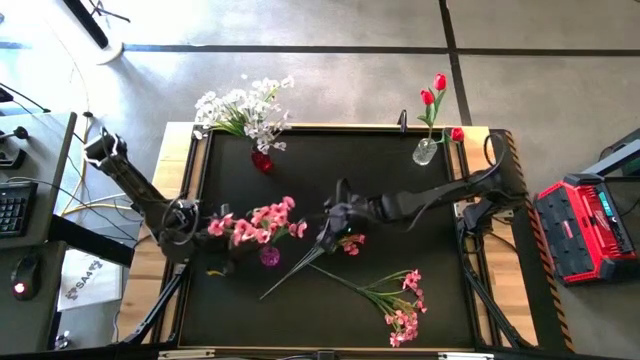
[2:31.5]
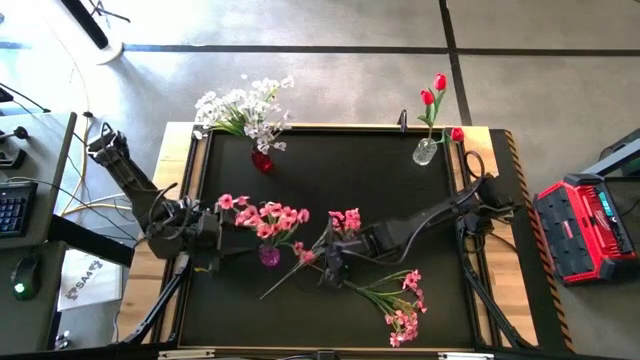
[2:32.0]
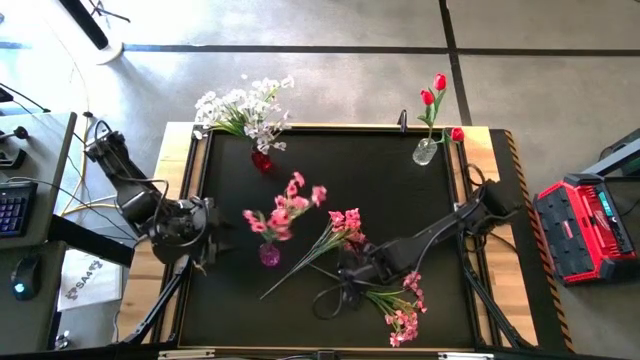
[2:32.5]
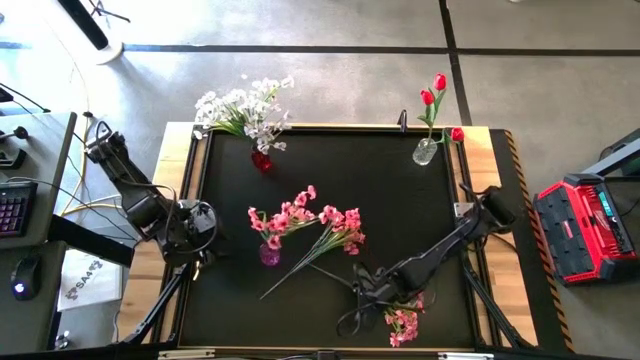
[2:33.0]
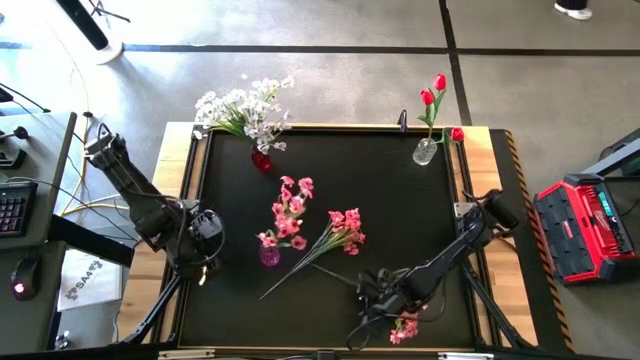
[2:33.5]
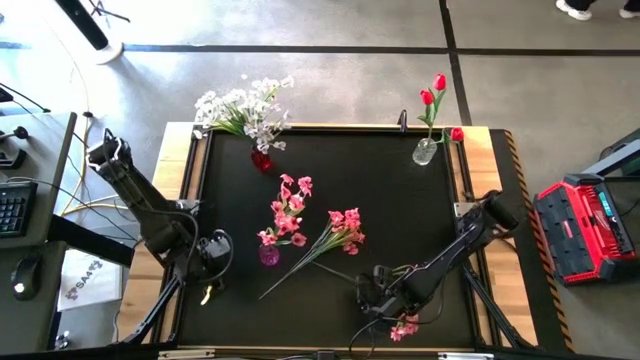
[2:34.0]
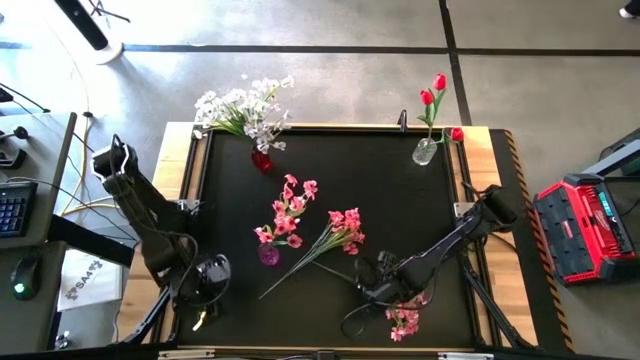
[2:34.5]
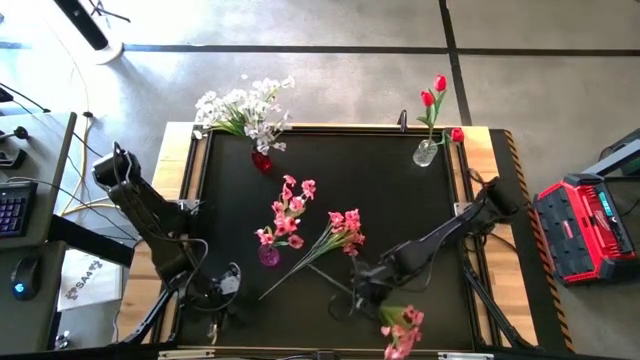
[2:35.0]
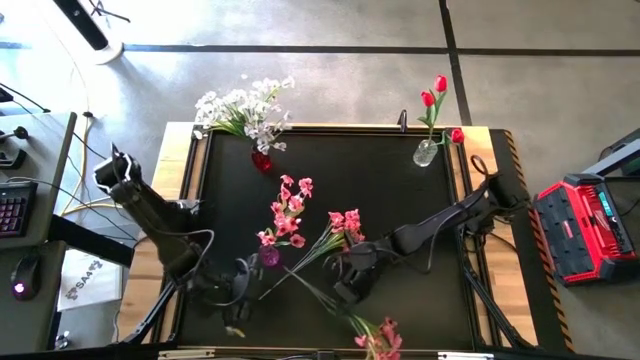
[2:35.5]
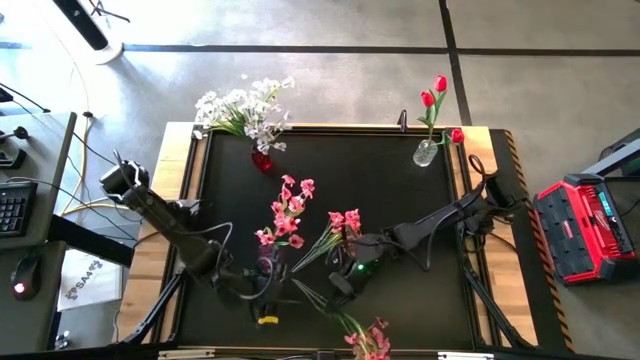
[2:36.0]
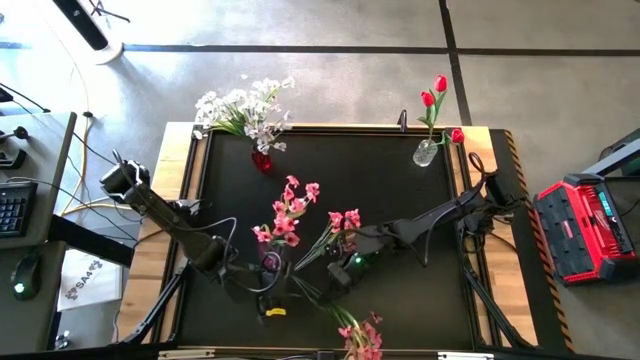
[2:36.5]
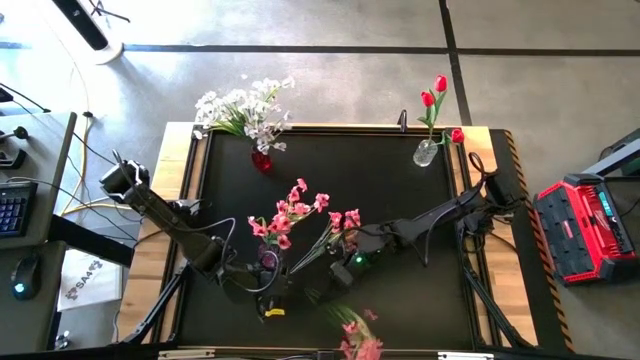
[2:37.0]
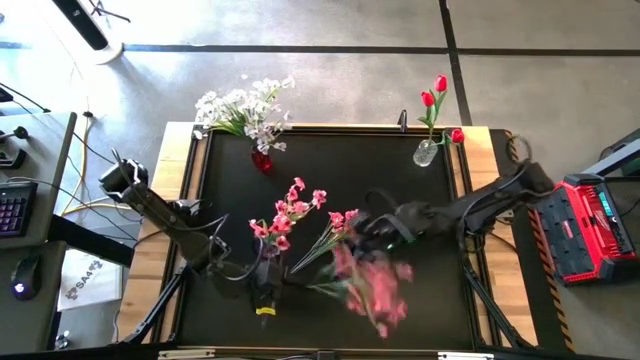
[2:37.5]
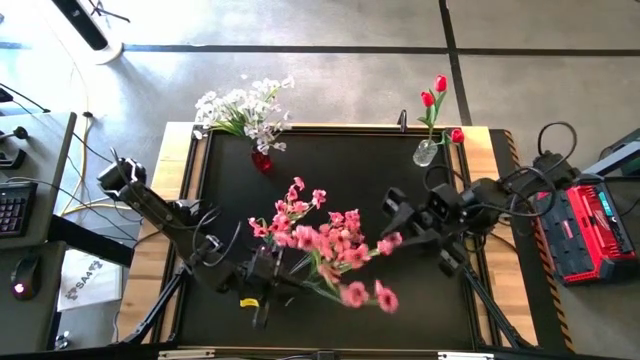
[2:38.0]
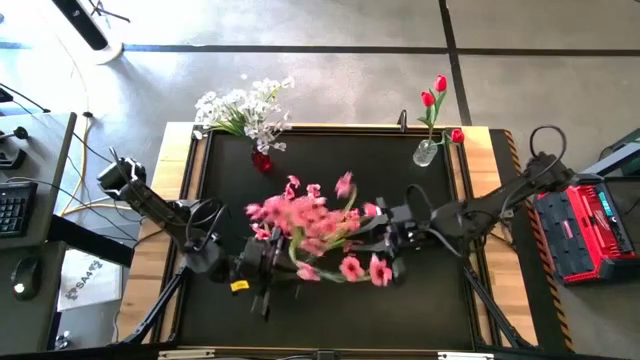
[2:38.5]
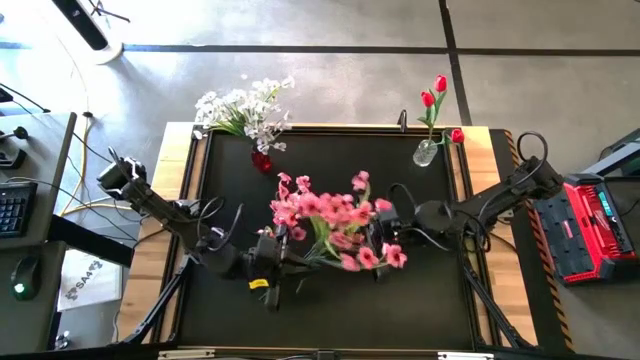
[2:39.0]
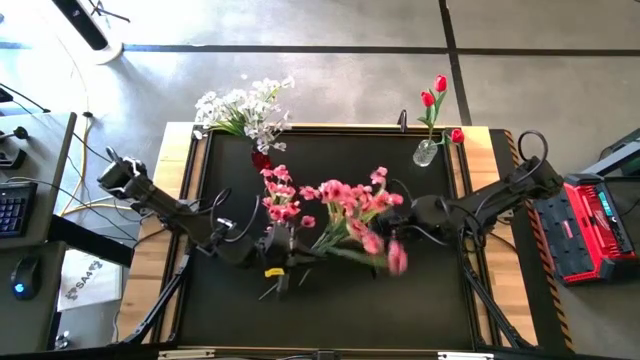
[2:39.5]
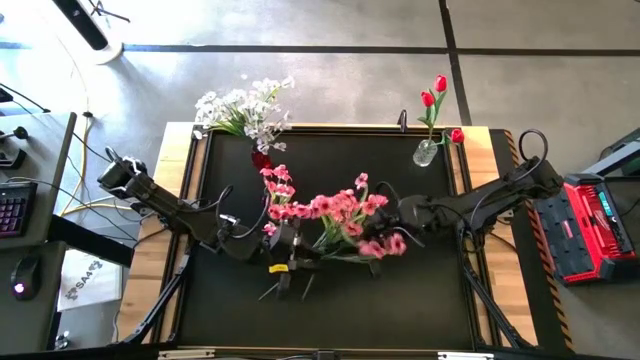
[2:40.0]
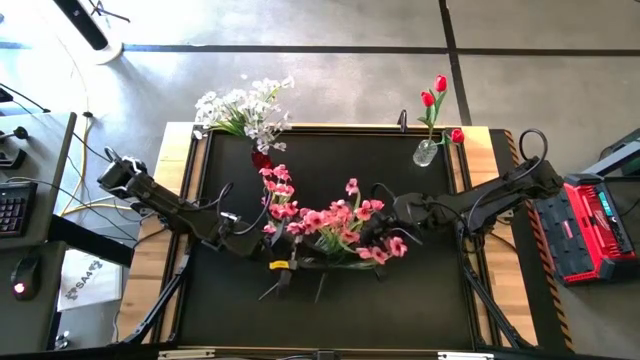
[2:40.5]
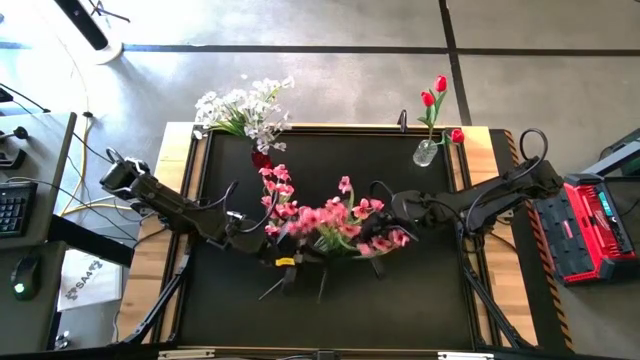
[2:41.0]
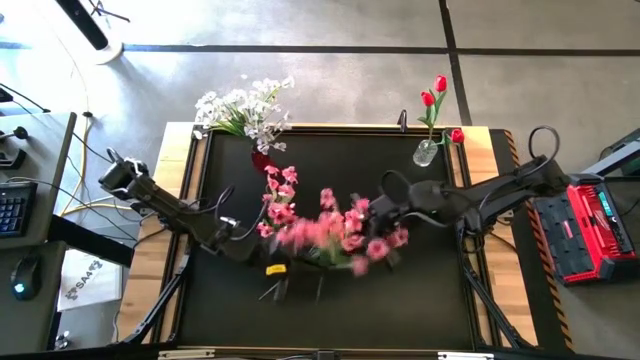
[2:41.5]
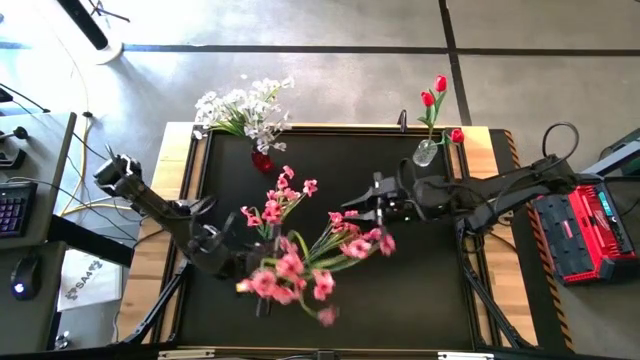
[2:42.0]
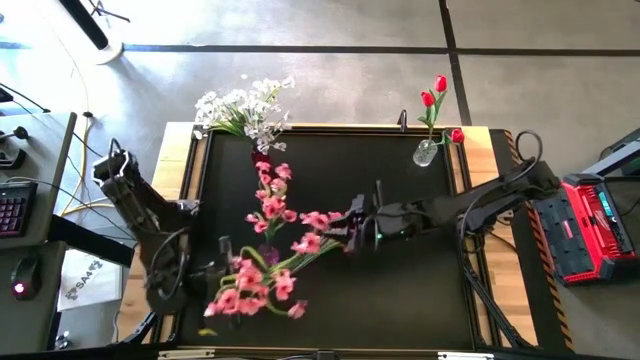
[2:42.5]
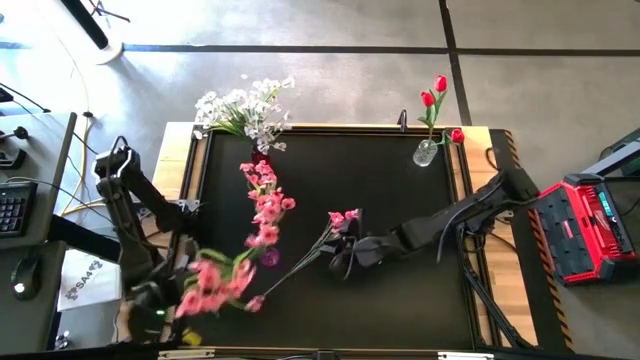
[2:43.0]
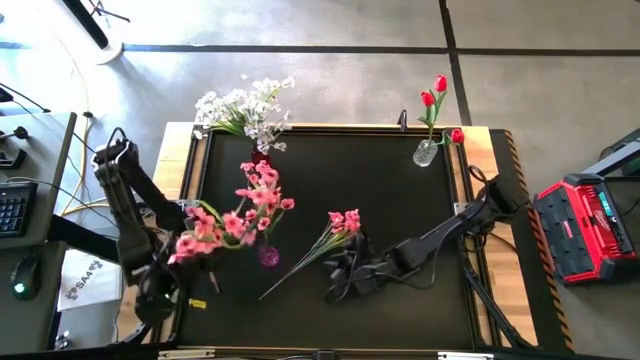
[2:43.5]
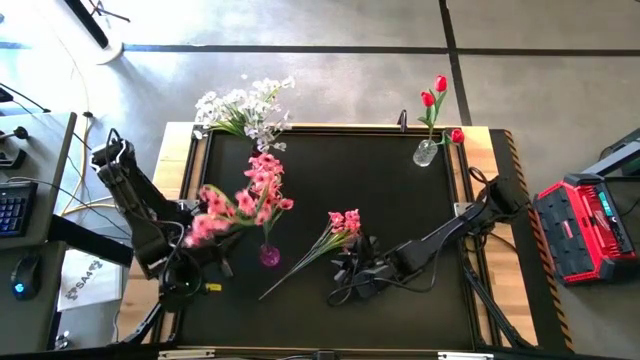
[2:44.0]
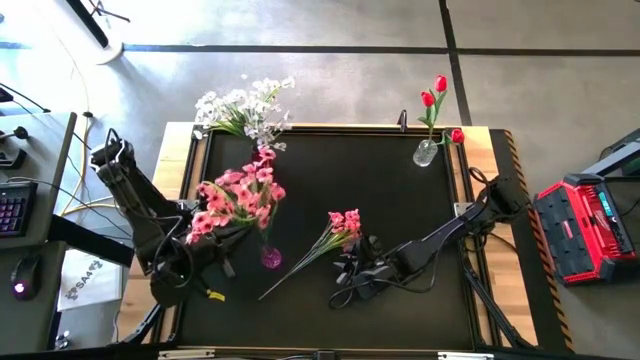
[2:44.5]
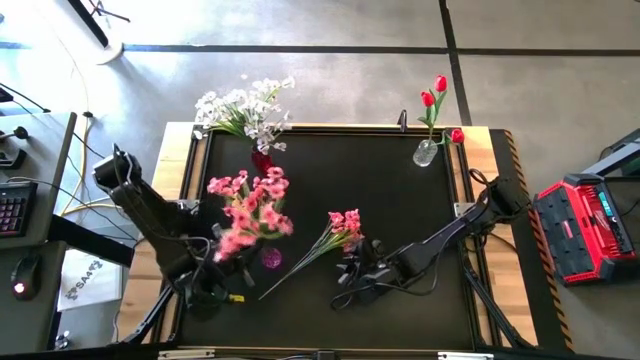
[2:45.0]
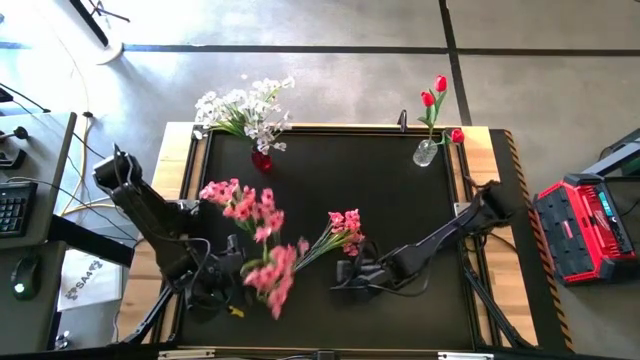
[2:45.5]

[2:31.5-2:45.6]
Task: Sort flowers into vase by color
Put the bottom pink flowers into the purple vase

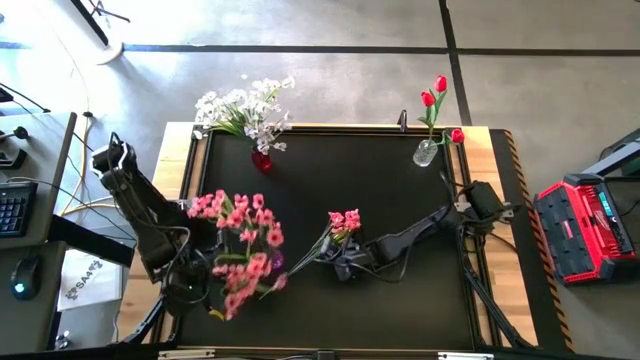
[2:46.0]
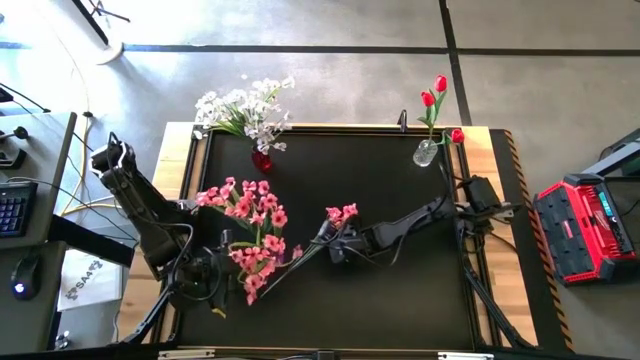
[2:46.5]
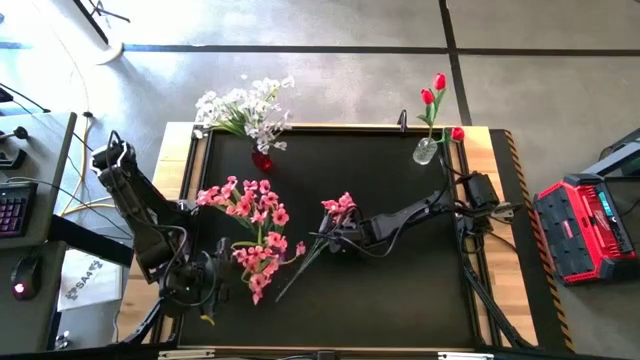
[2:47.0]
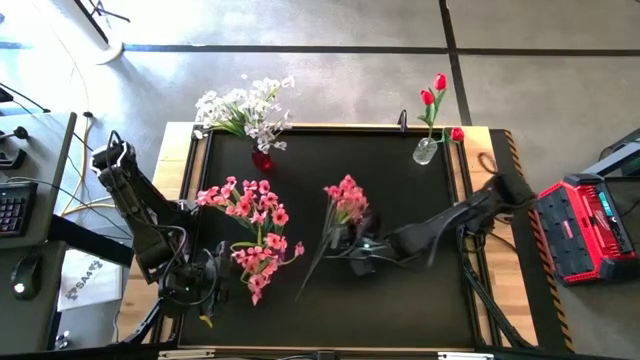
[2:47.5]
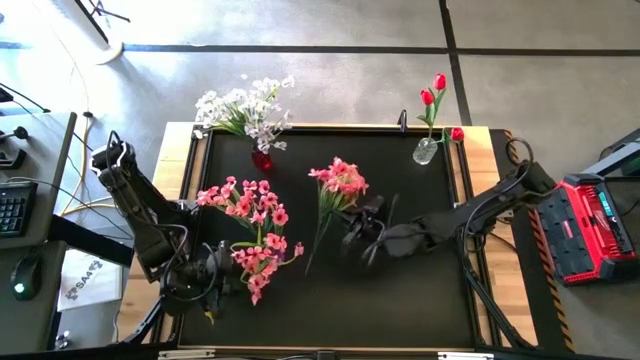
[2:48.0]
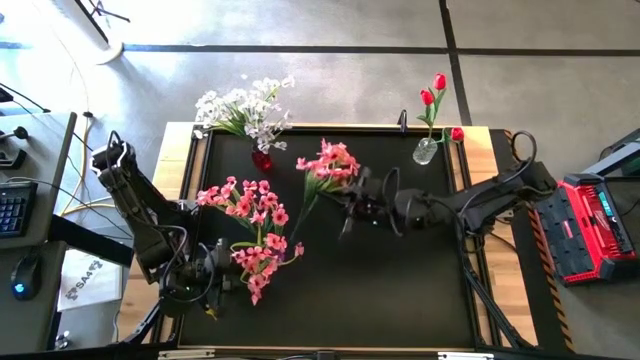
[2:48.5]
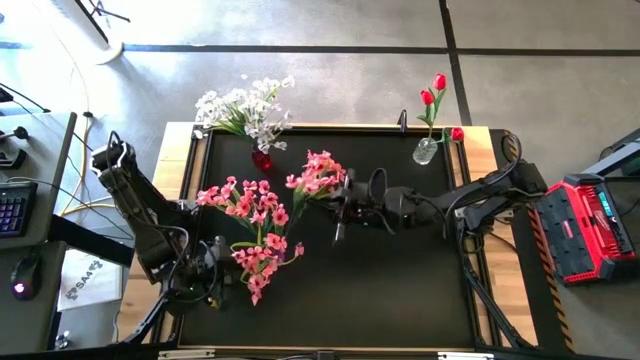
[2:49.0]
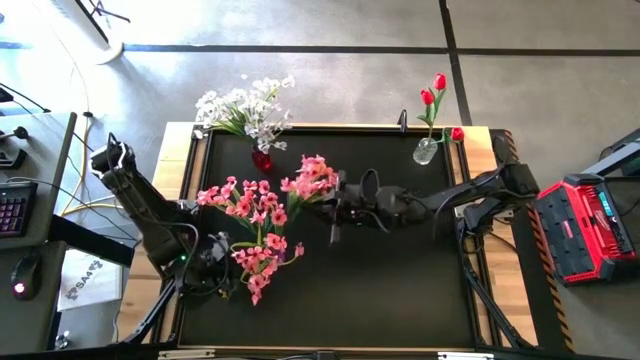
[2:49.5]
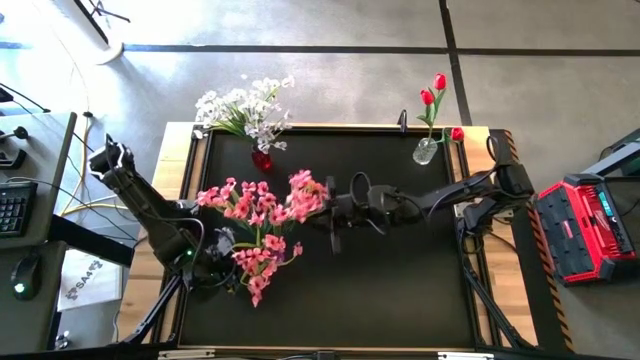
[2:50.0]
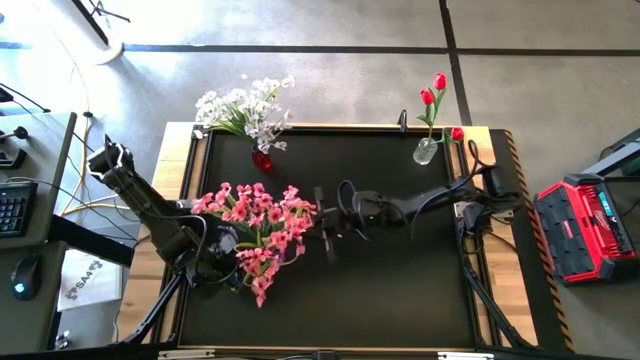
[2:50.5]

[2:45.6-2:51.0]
Put the pink flowers into the purple vase

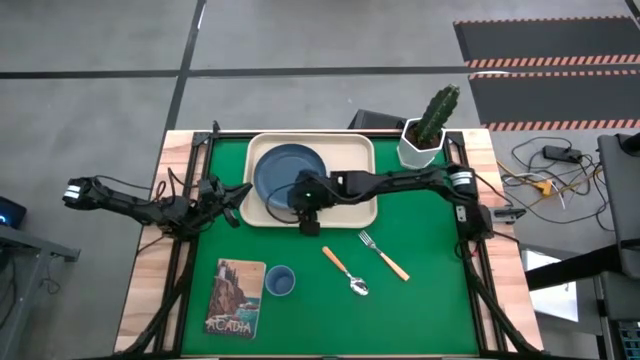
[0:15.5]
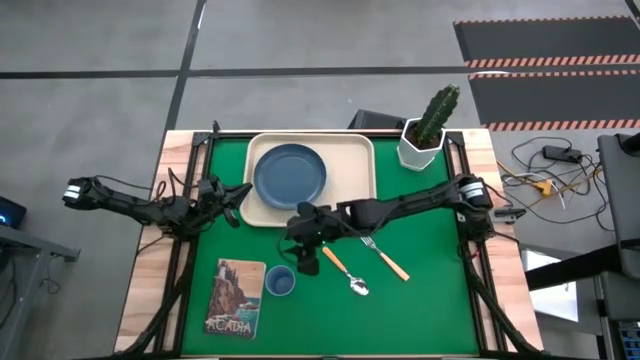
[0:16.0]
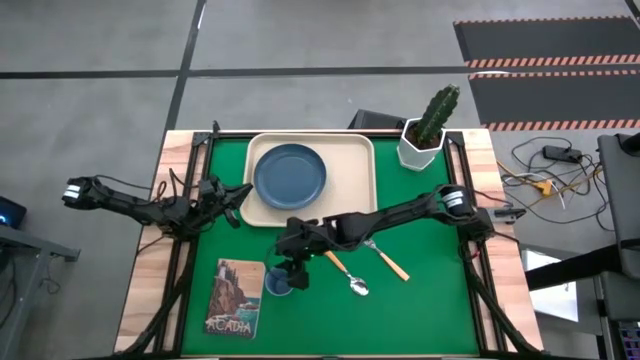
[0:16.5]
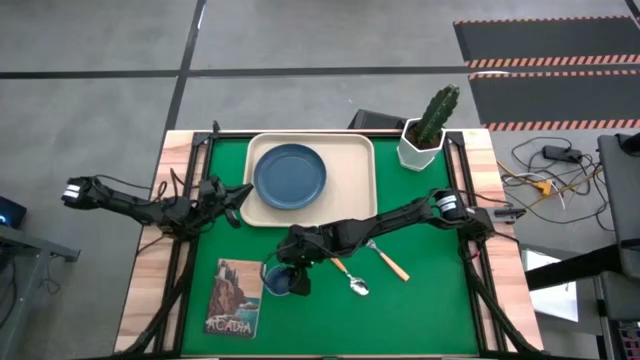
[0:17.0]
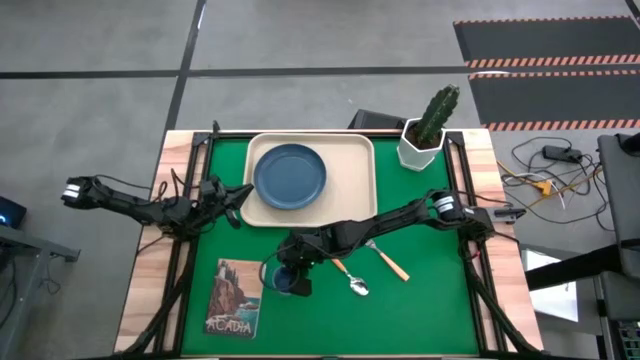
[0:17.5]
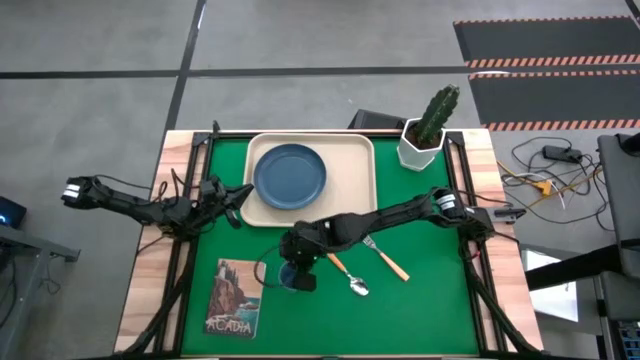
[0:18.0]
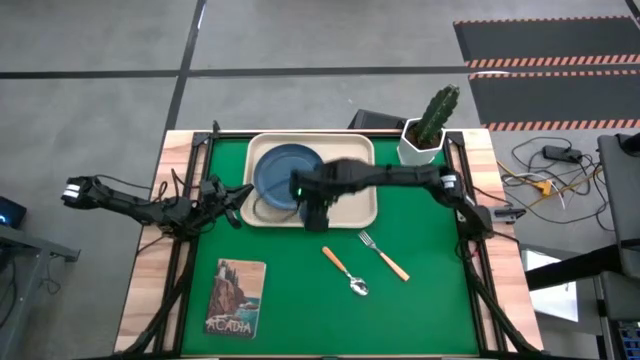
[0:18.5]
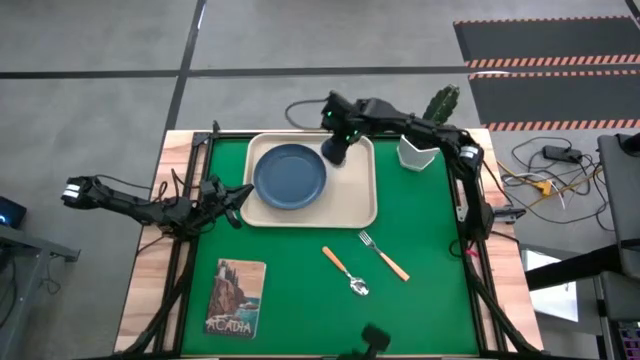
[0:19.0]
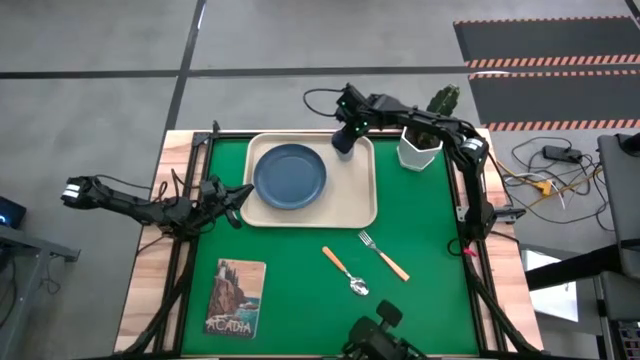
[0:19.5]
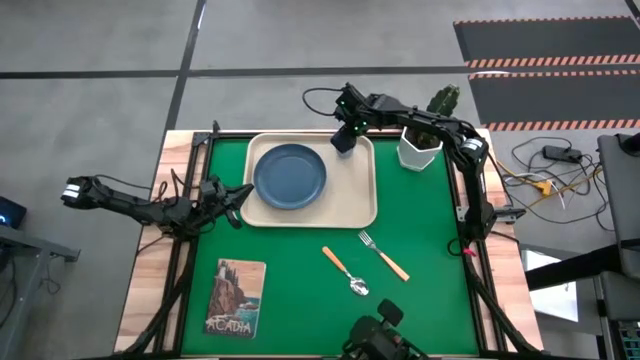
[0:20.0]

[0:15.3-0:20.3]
Task: Pick and place plate/cup/fork/spoon on tray
Put the blue cup on the white tray
